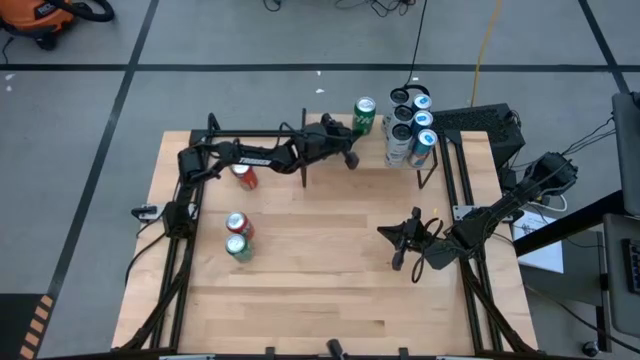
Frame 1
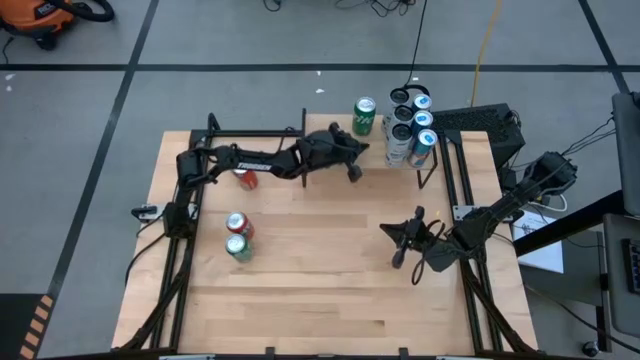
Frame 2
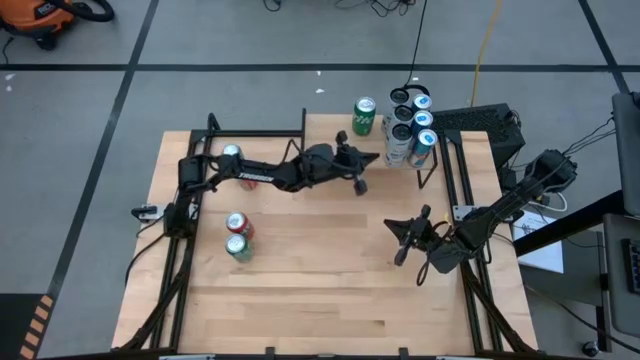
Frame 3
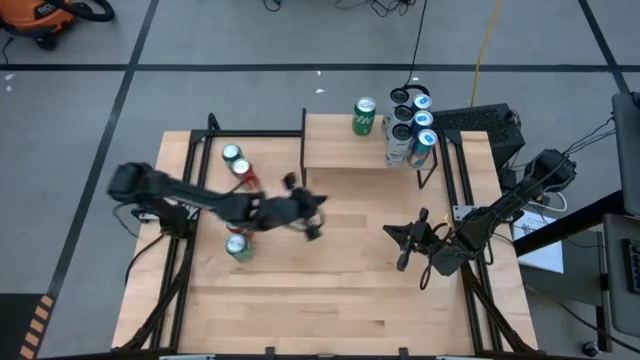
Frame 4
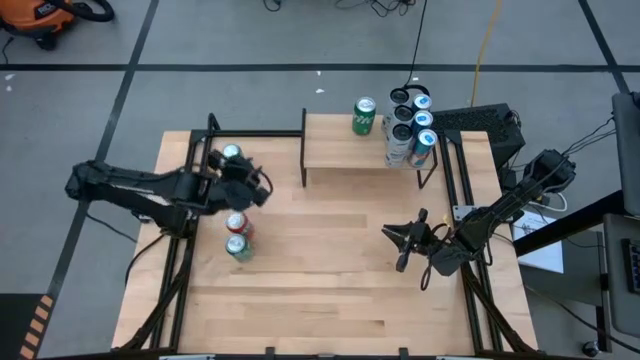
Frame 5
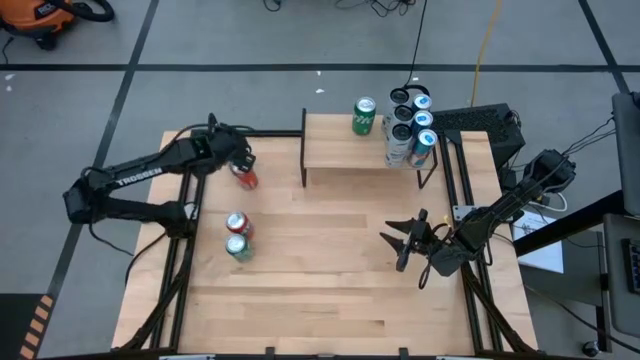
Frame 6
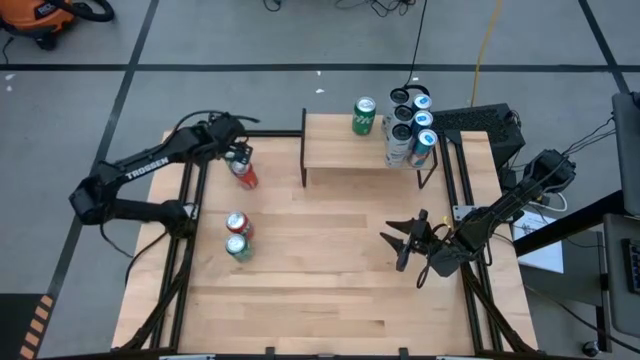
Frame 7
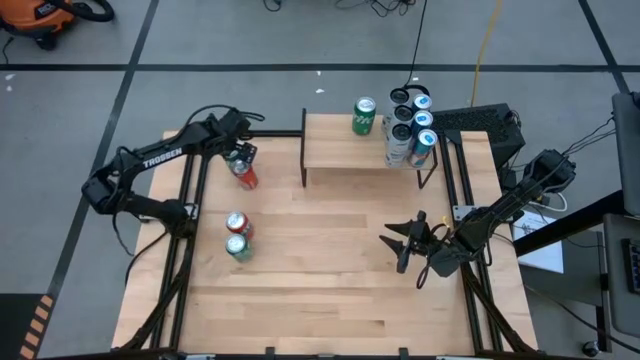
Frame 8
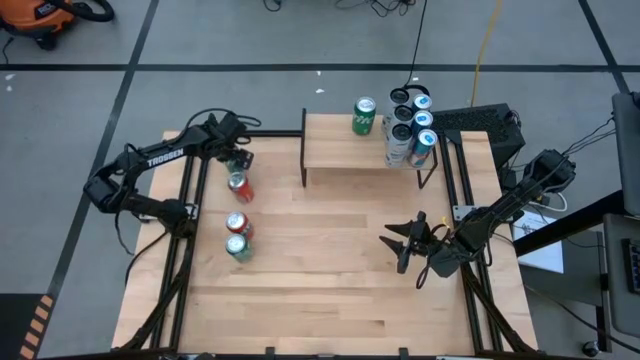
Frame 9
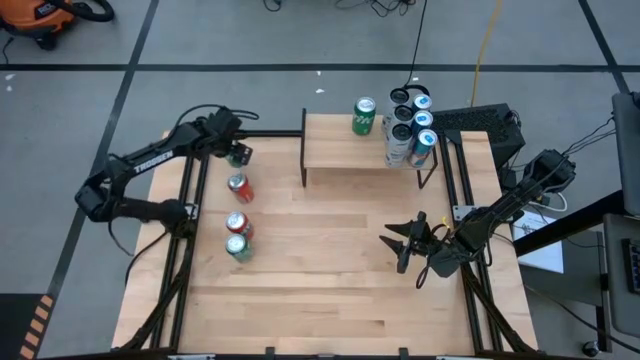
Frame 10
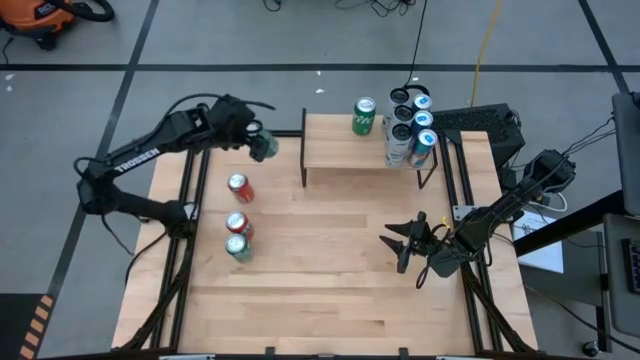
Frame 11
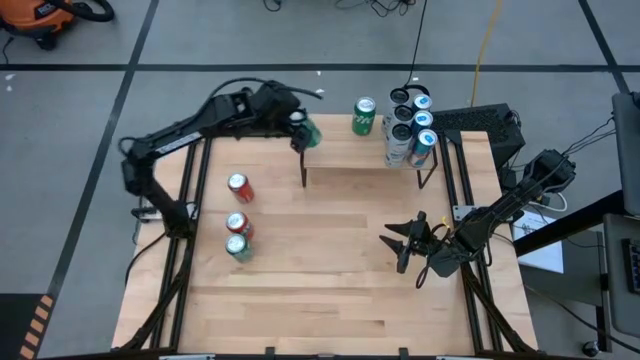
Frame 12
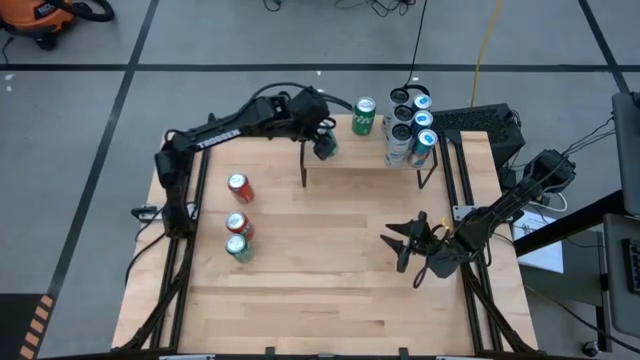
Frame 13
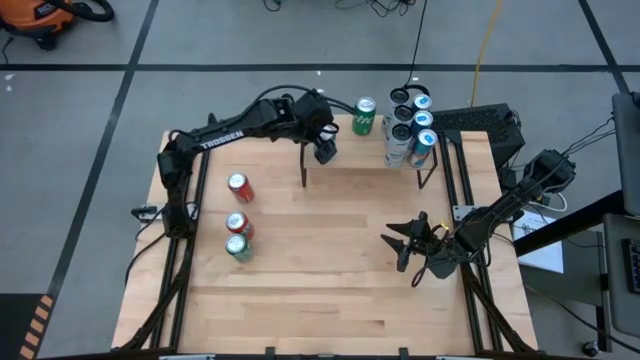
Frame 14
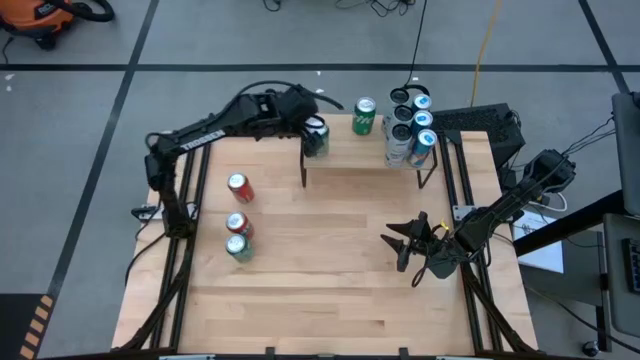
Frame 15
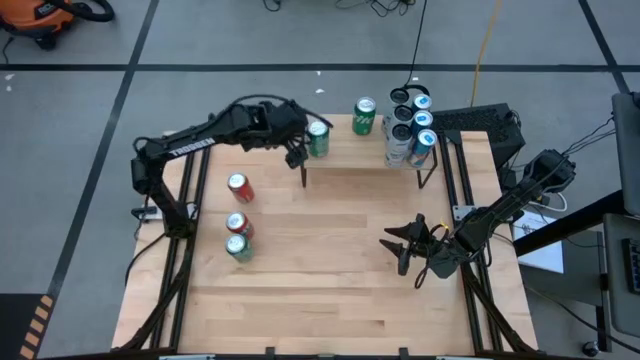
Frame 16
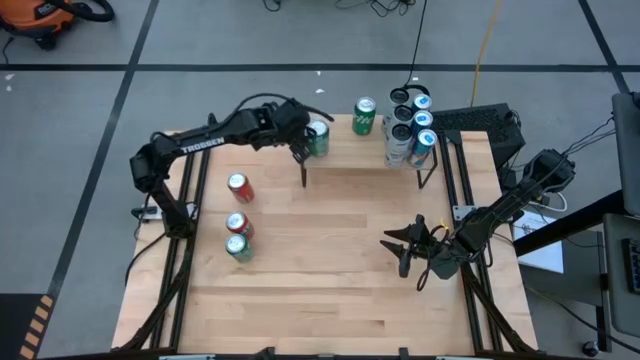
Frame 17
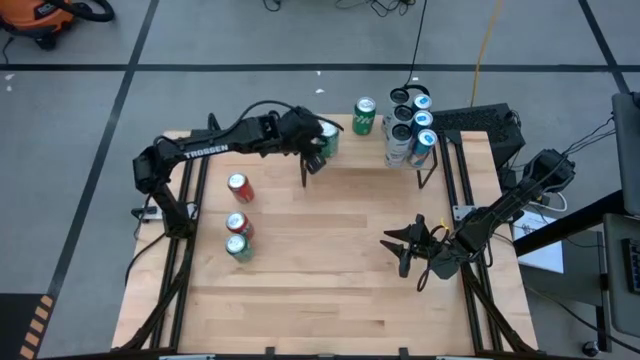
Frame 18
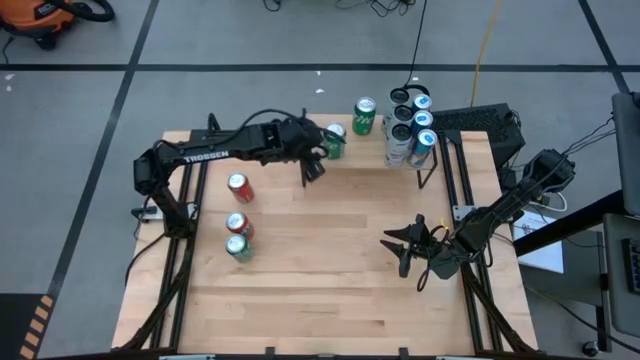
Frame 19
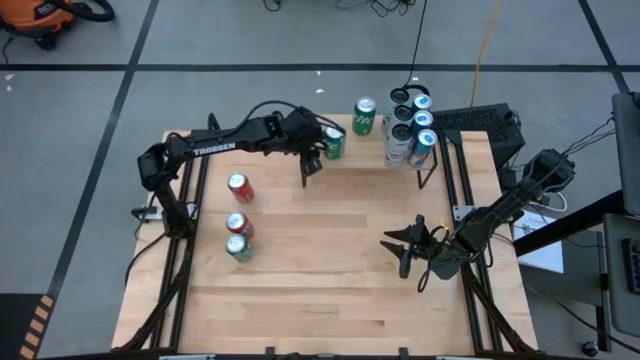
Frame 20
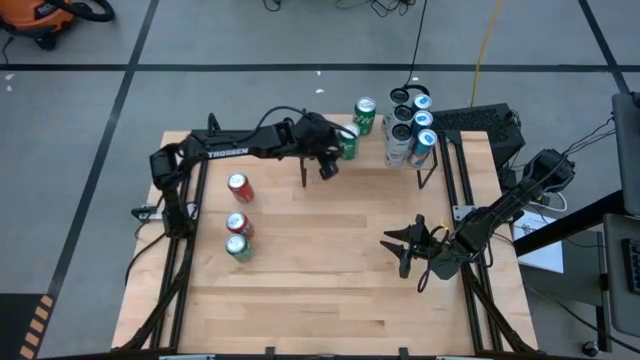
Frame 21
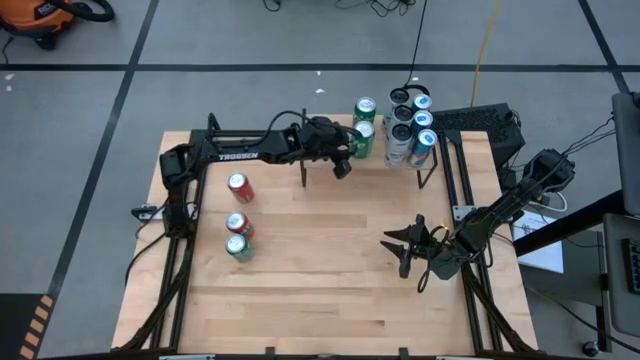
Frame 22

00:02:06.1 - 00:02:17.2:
Task: Place canned beverage on shelf
Put the top green soda can on the shelf aligned with the other green soda can

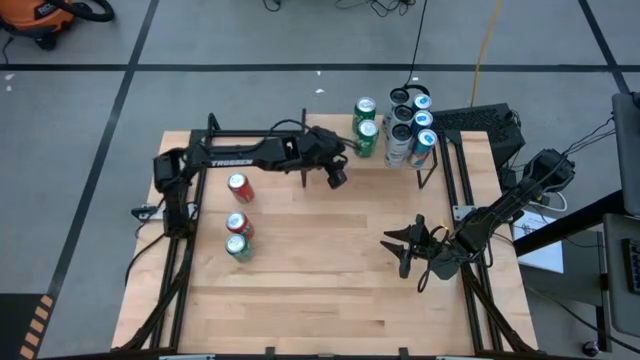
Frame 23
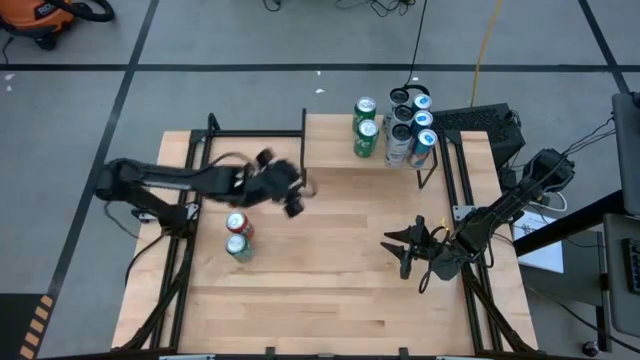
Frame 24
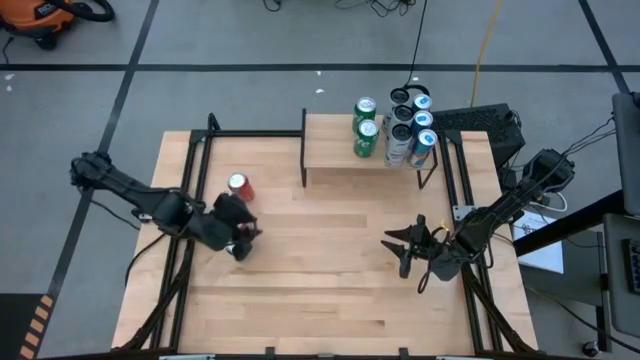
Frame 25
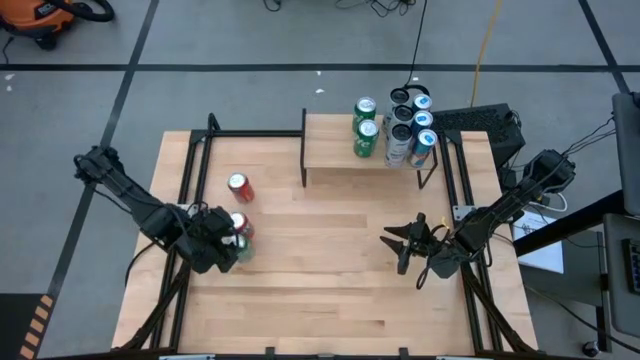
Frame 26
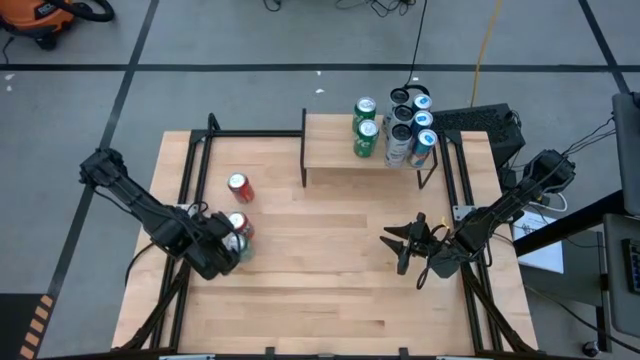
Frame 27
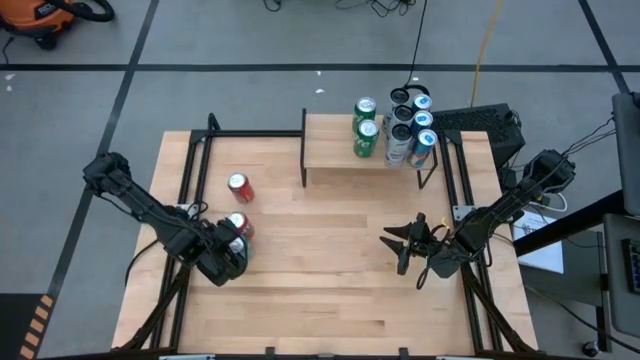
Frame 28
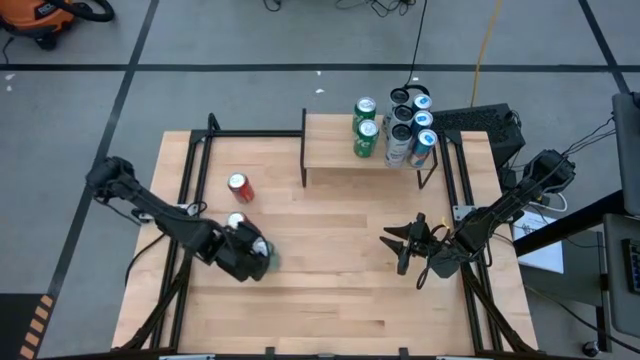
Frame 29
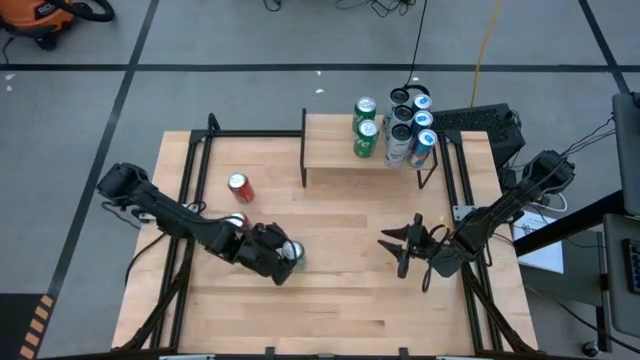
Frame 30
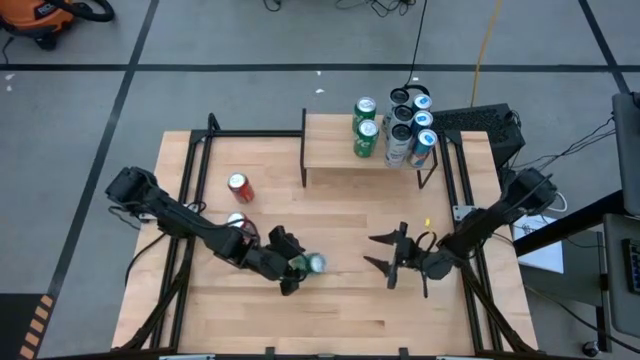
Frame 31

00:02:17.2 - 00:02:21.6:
Put the green soda can on the shelf aligned with the other green soda can

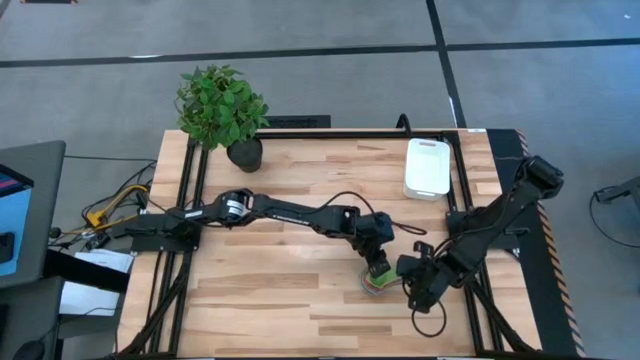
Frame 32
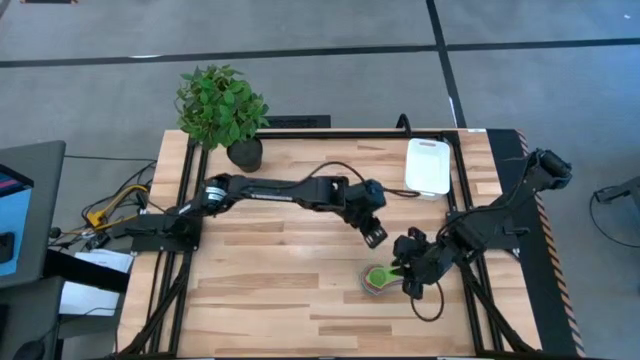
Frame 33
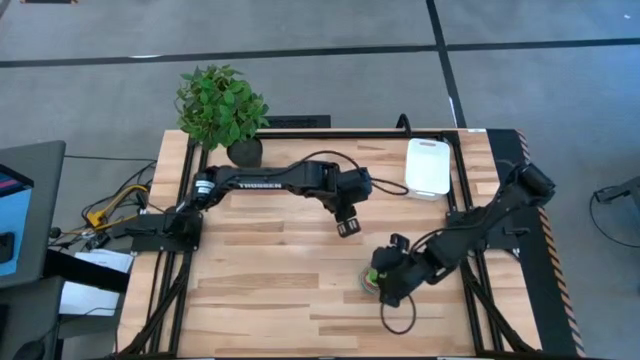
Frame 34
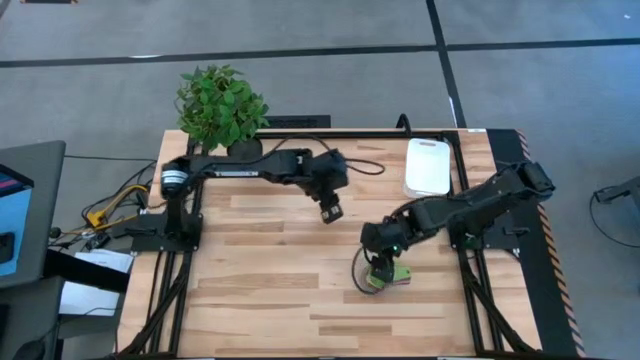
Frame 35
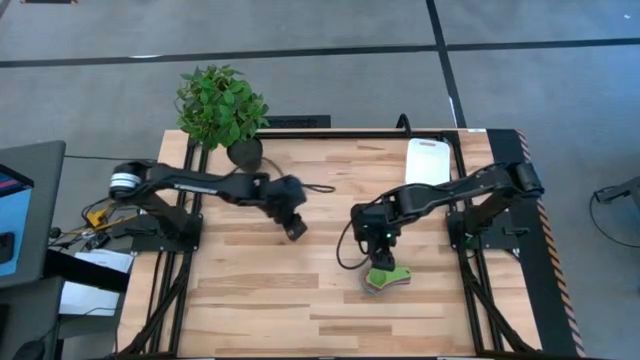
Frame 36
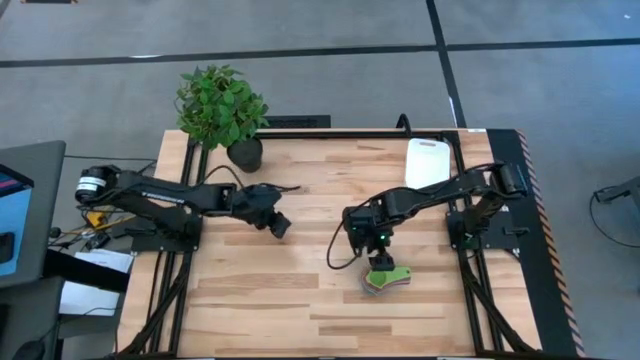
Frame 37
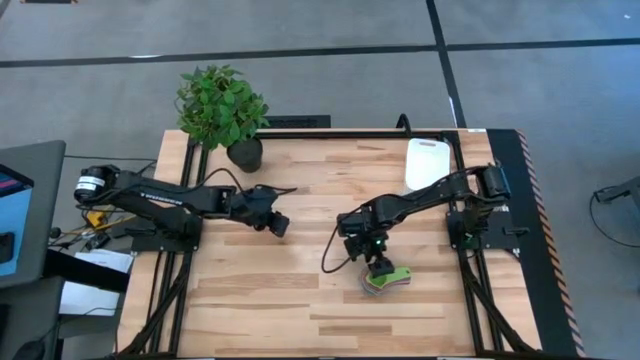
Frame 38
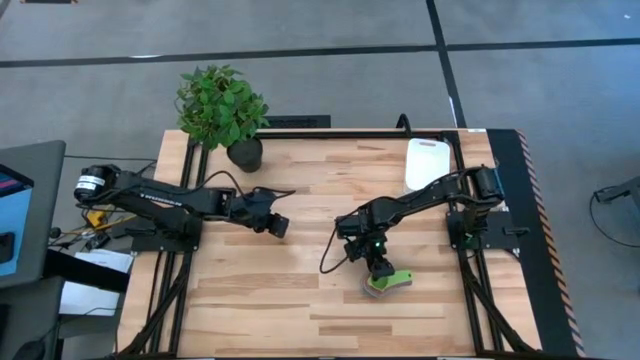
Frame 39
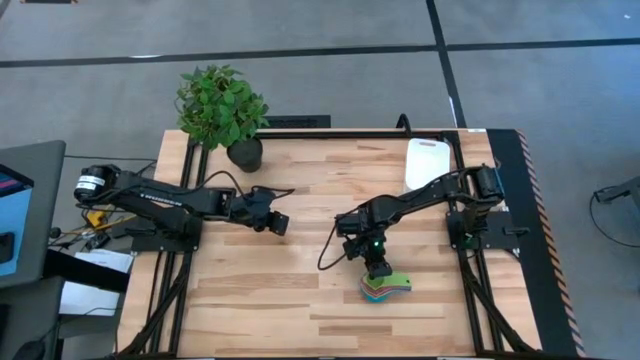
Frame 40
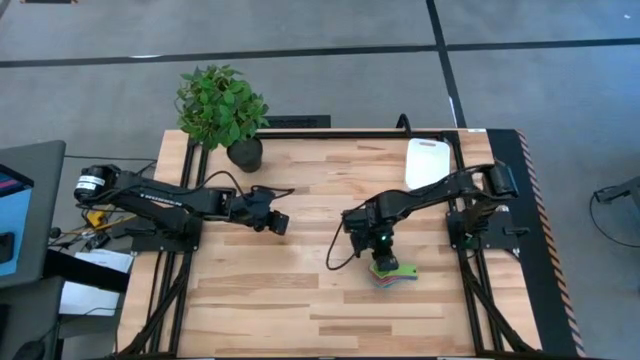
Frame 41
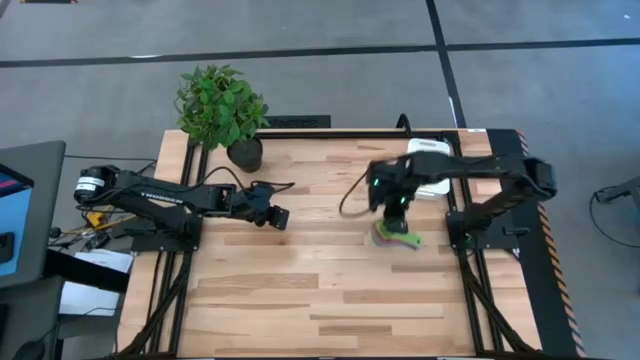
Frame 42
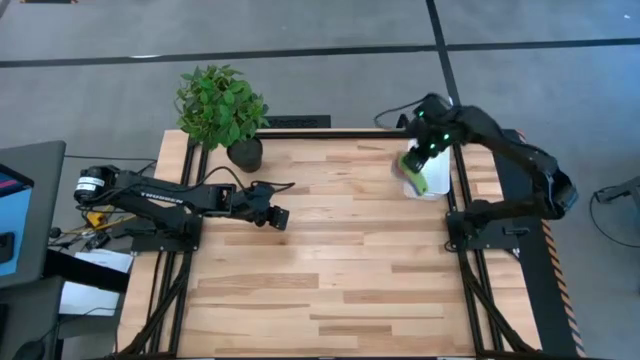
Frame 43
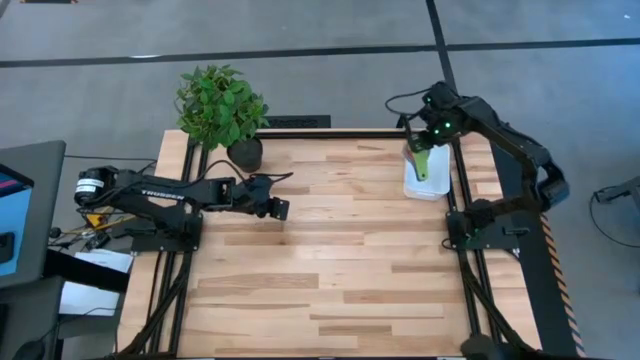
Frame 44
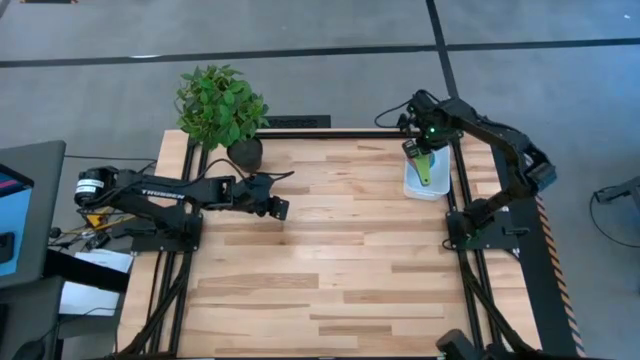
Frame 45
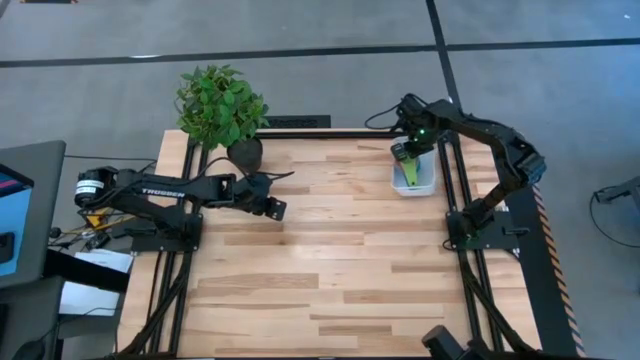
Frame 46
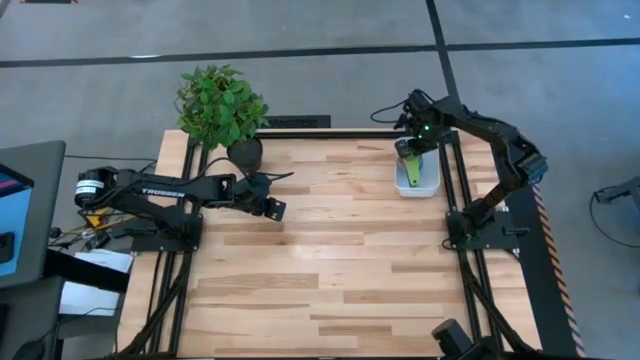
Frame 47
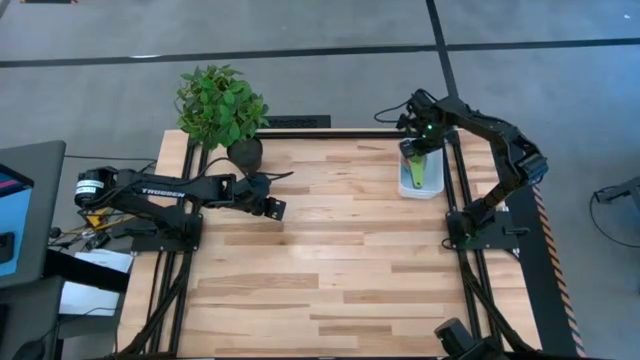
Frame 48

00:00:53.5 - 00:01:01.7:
Task: Nest measuring cups in basket
Put the nested measuring cups into the white bin
